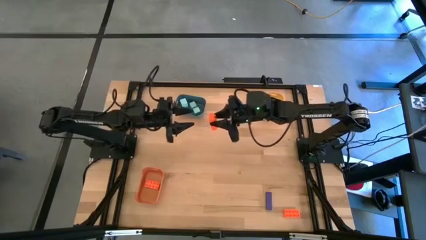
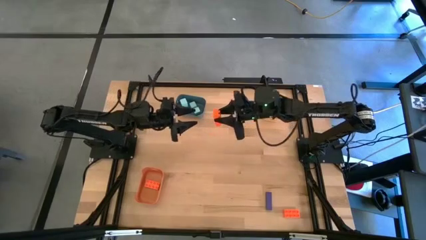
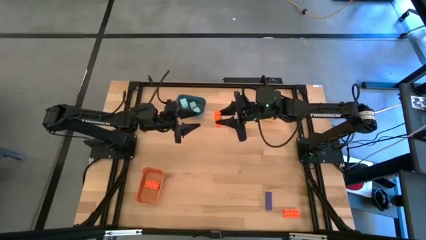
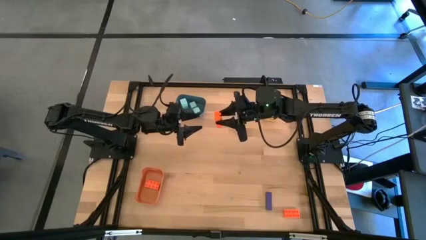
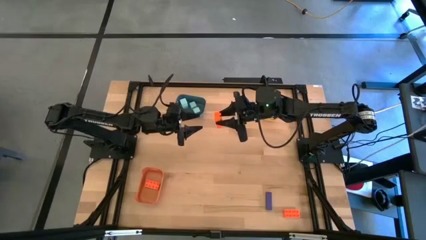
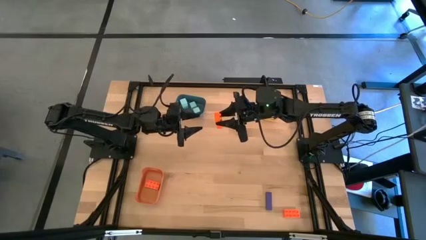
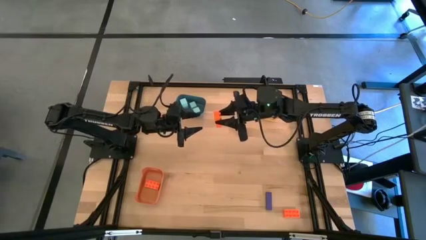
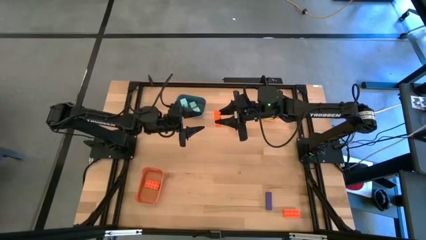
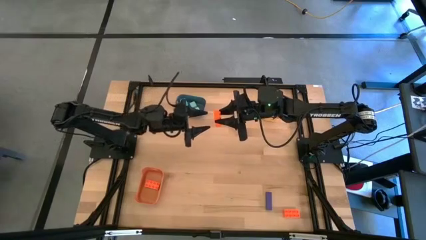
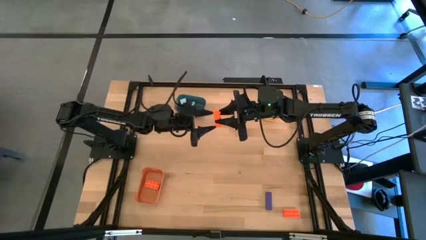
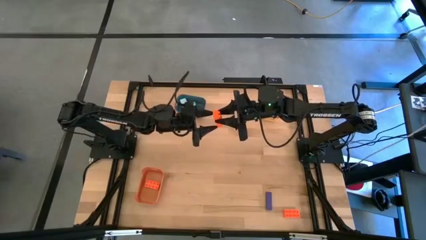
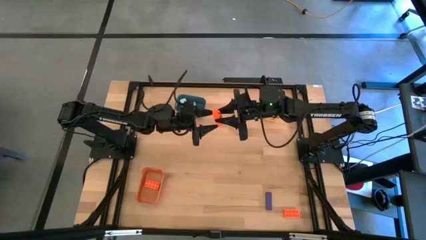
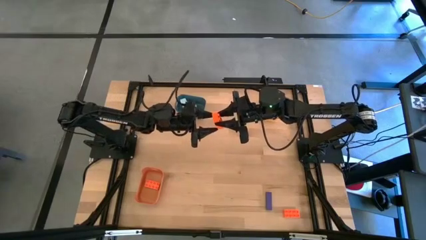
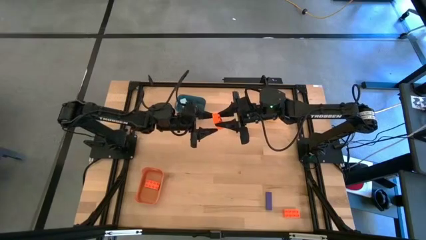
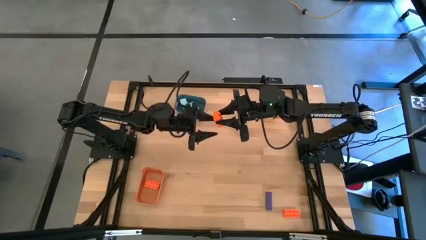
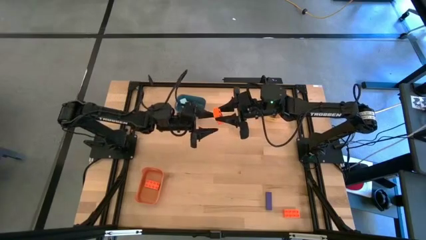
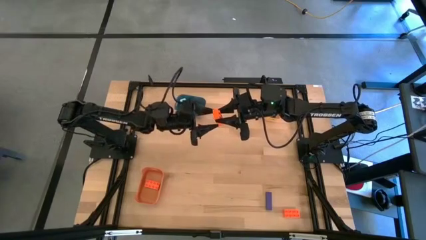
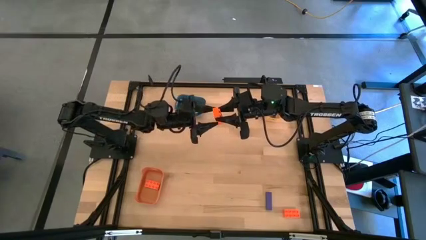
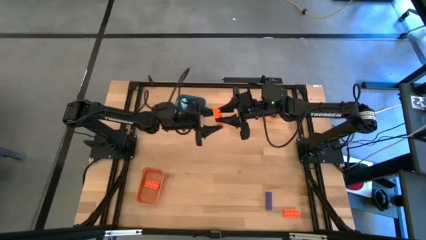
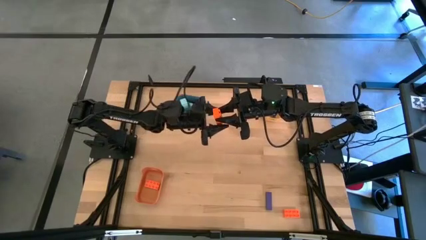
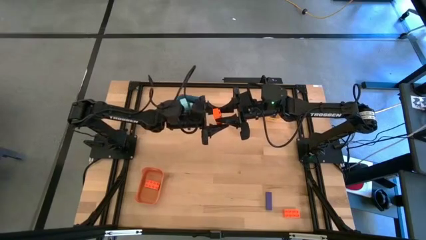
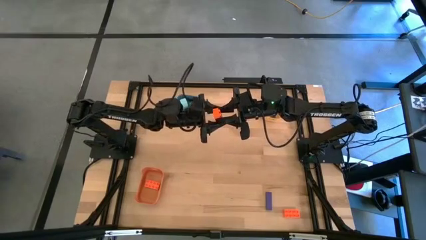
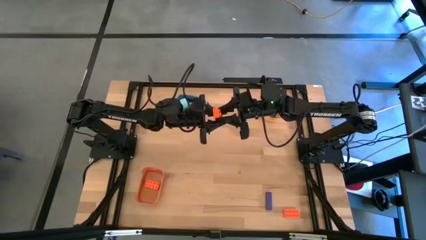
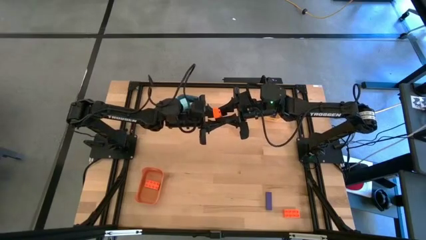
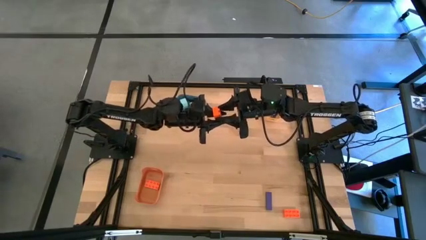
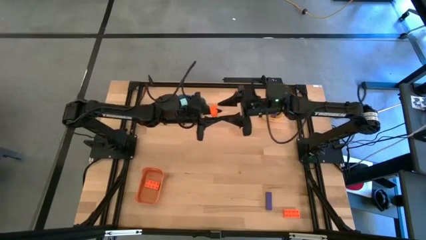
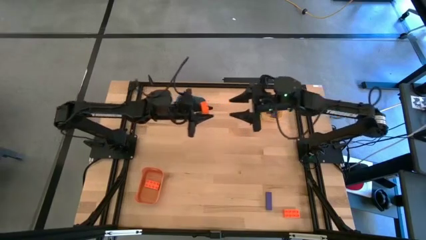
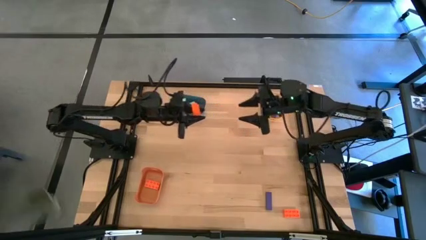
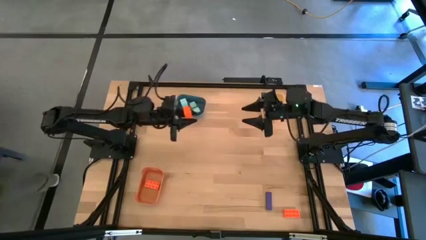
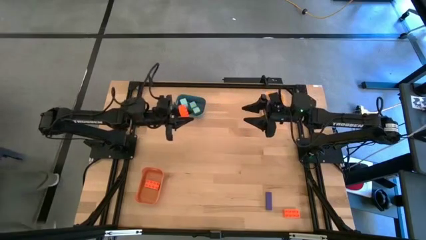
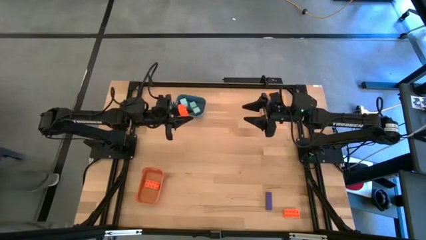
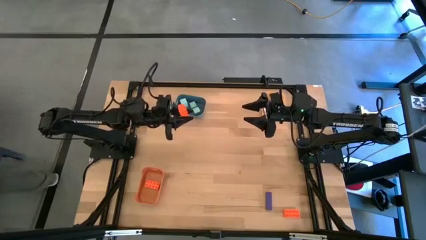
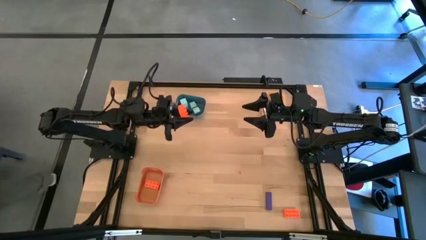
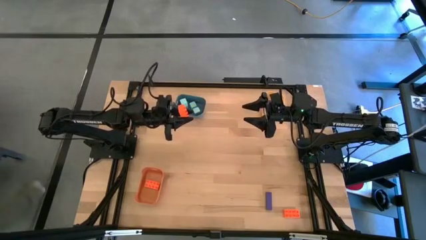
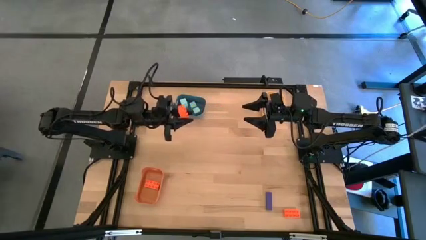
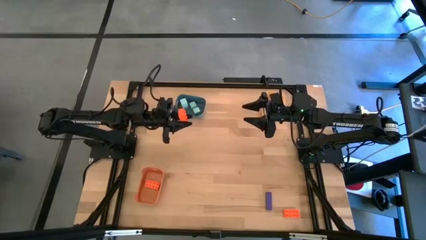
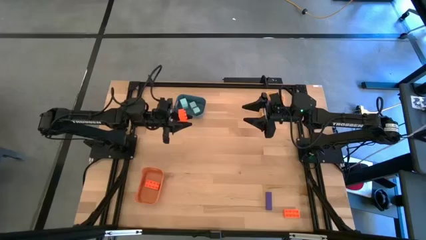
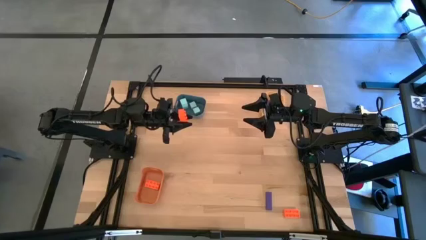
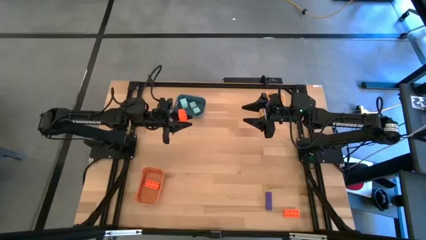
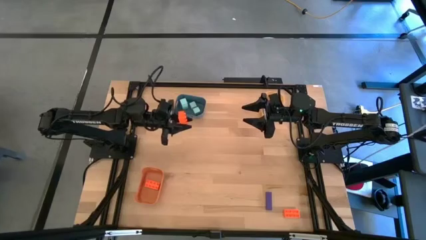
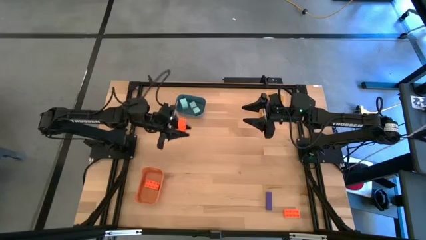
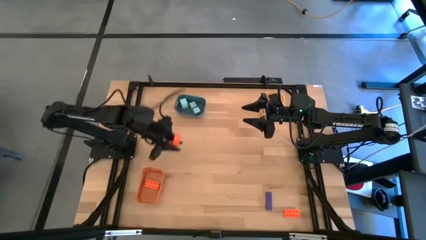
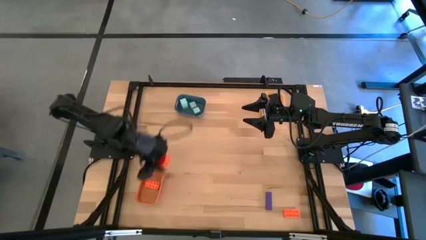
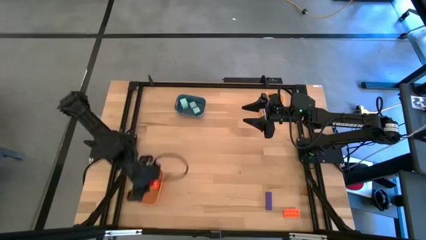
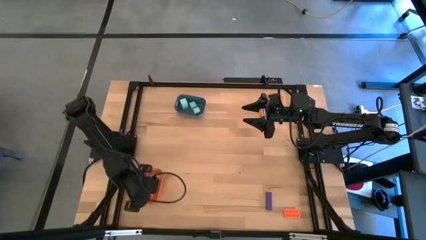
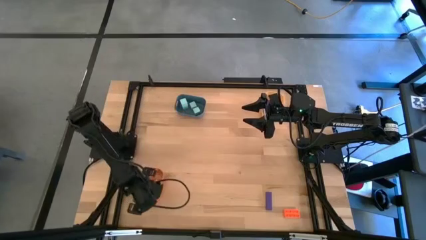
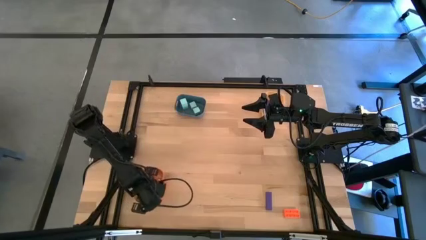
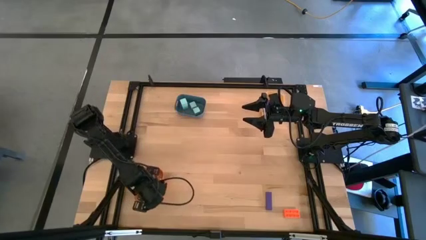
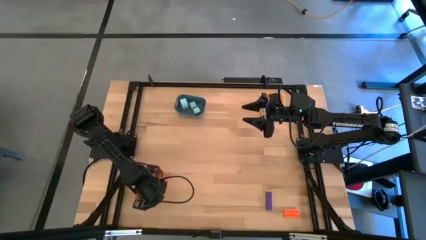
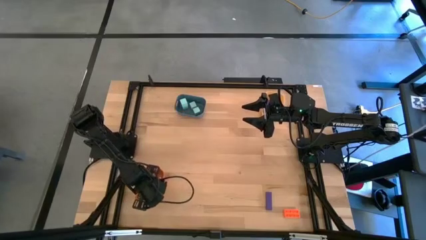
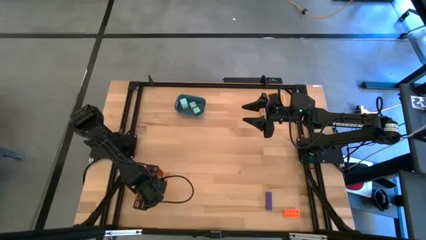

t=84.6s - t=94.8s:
Task: Sort & place blocks by color
Put the top orange game piece into the orange bin

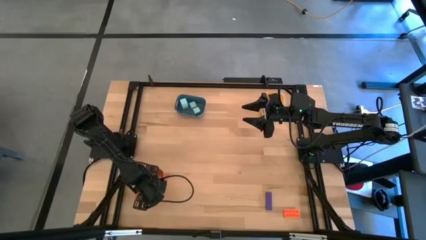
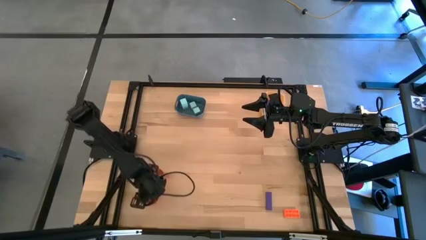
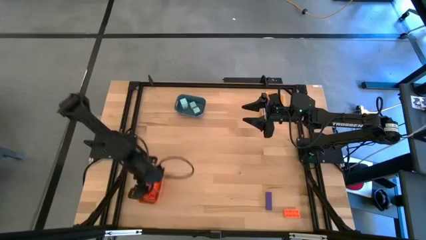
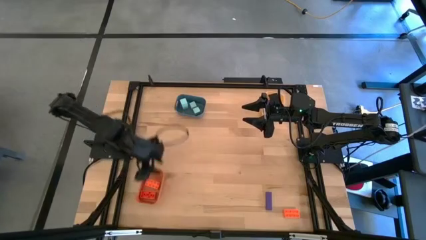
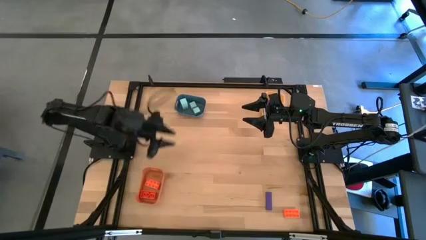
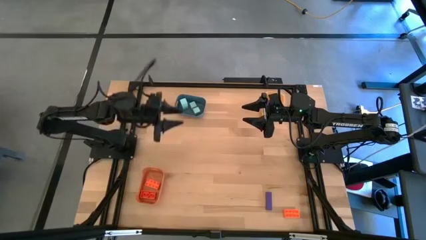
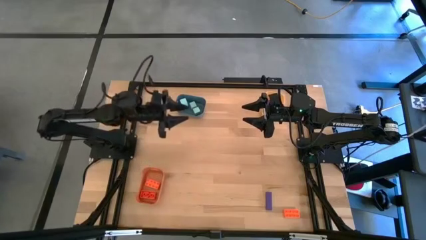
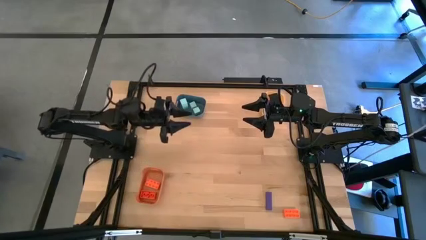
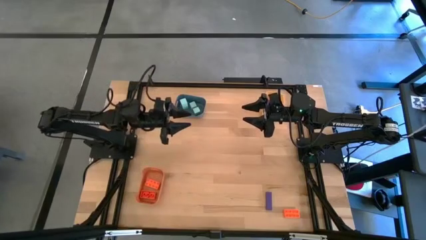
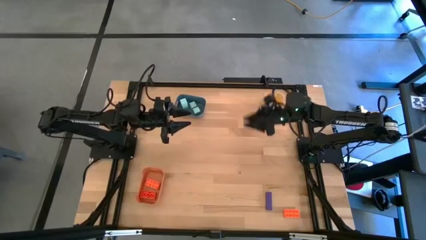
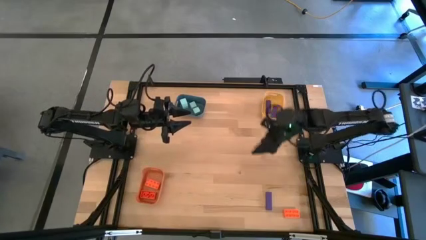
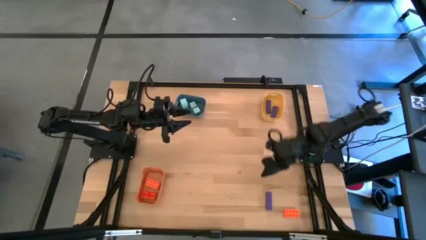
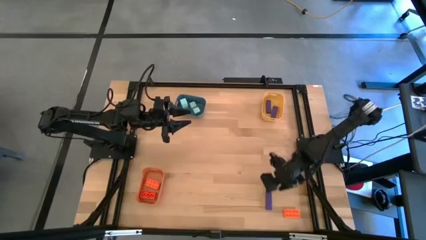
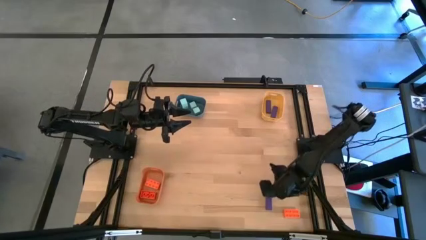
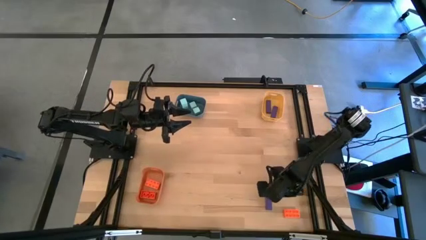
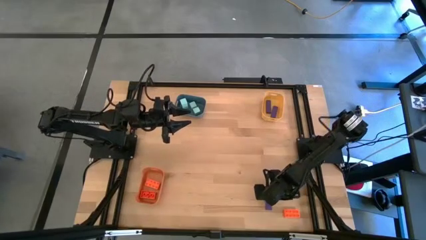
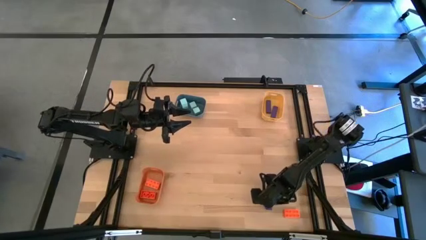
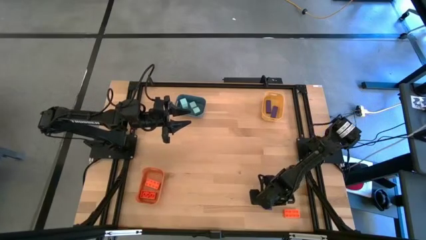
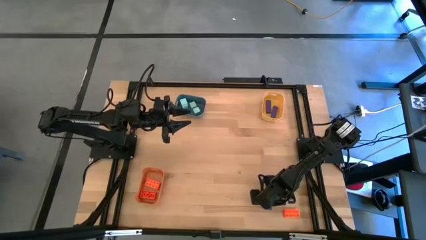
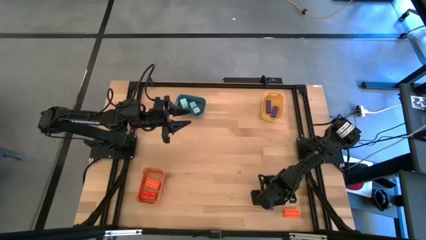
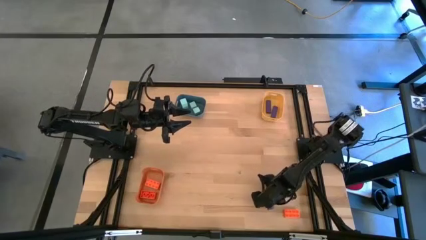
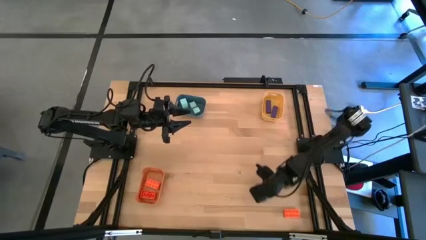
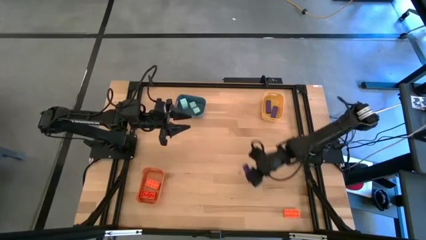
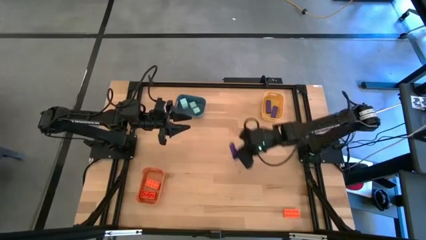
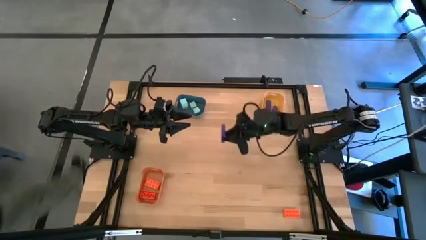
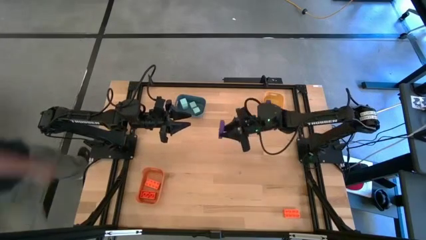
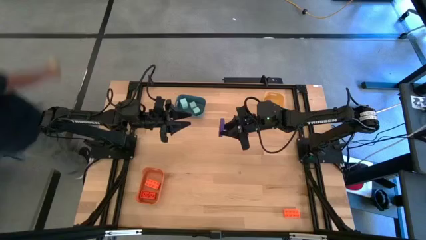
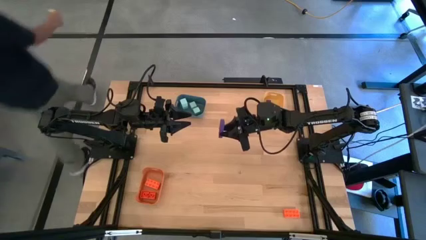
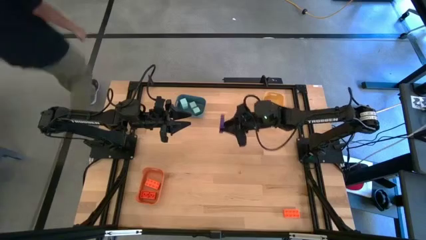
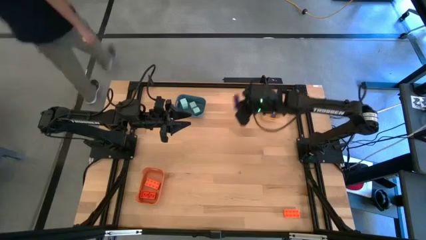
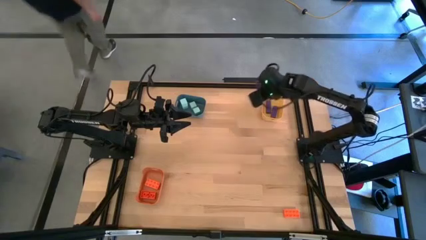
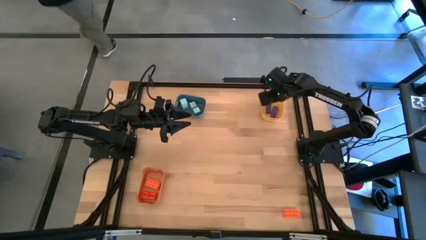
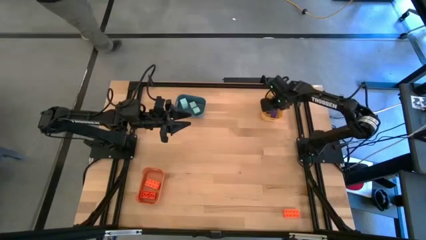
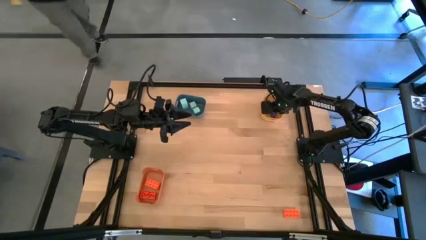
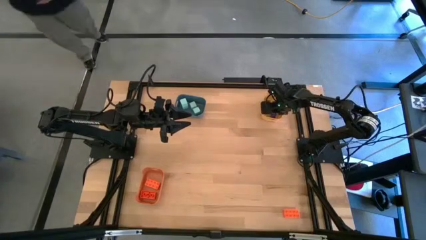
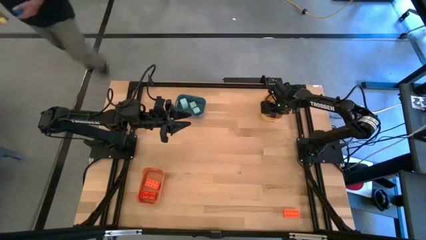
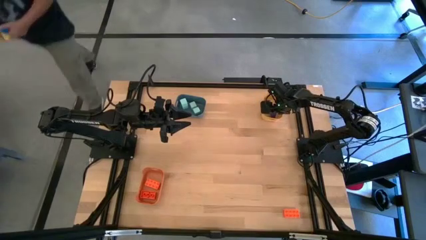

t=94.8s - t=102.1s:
Put the purple rectangle block into the yellow bin
